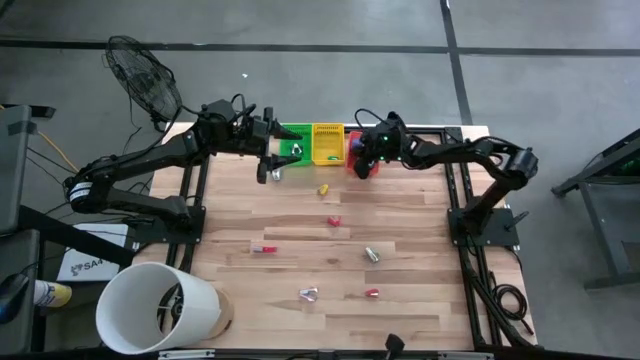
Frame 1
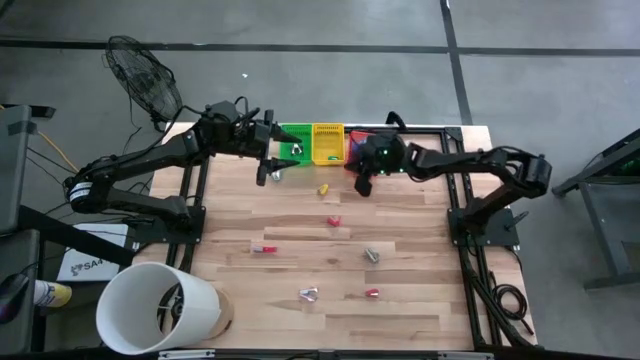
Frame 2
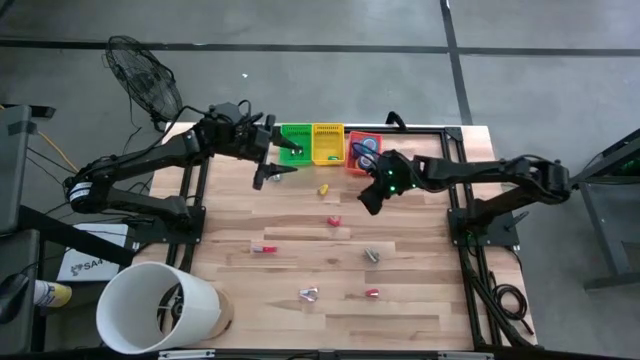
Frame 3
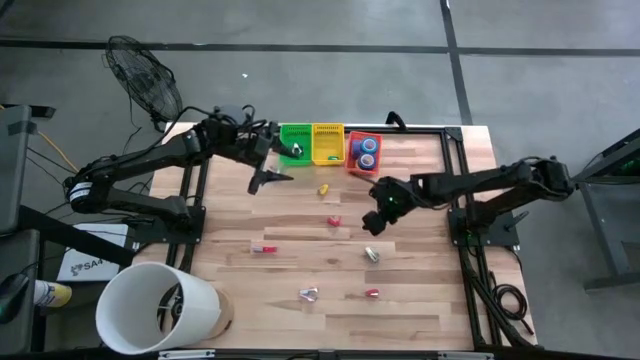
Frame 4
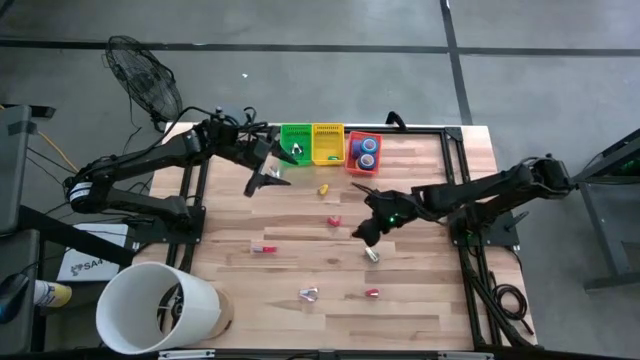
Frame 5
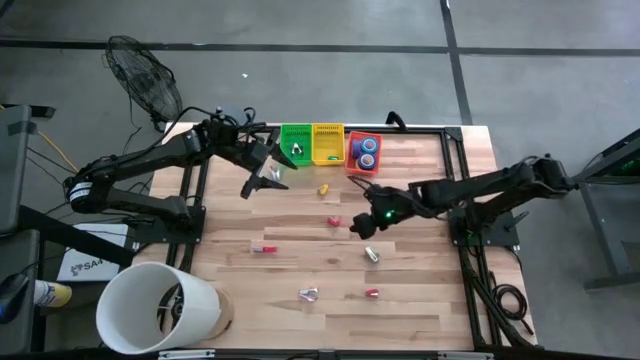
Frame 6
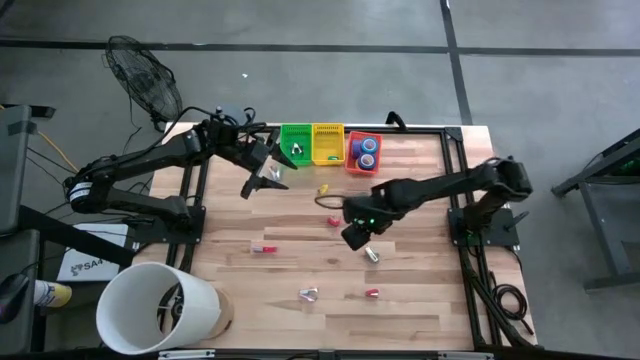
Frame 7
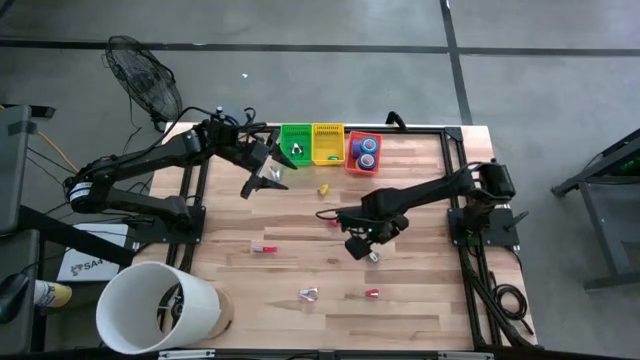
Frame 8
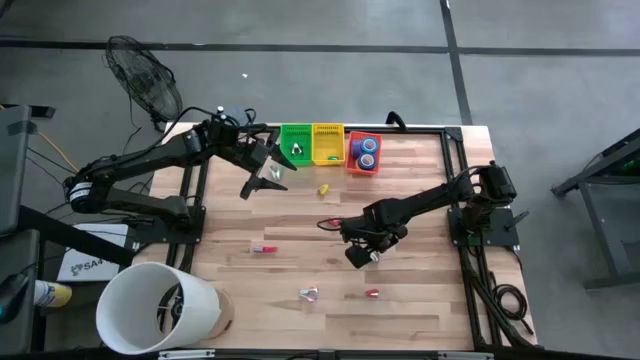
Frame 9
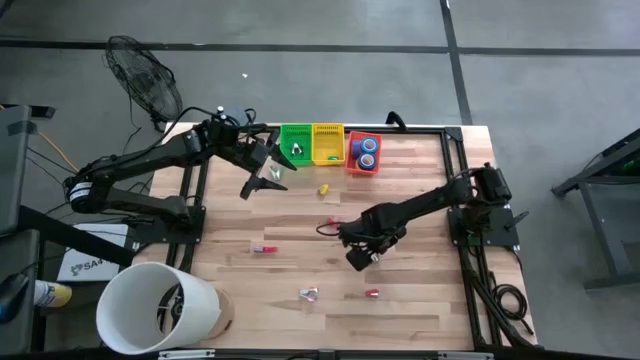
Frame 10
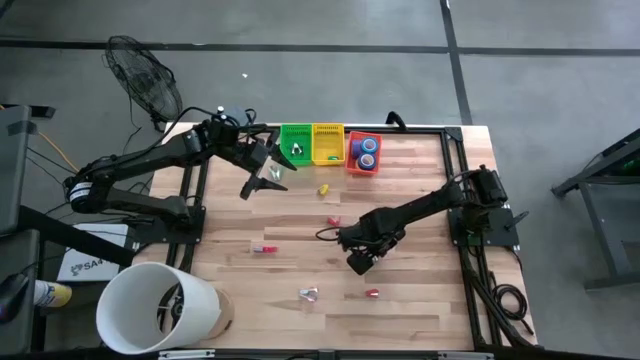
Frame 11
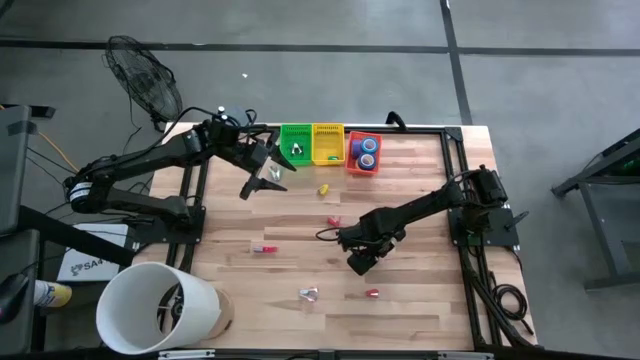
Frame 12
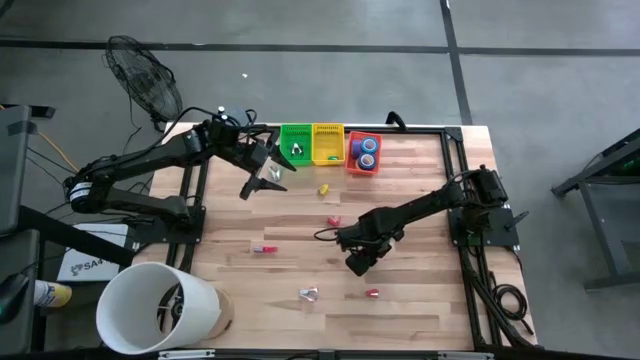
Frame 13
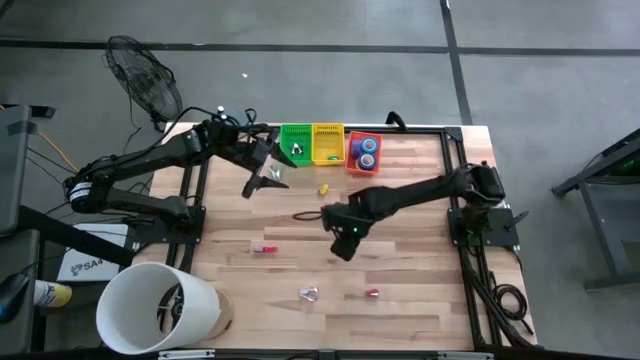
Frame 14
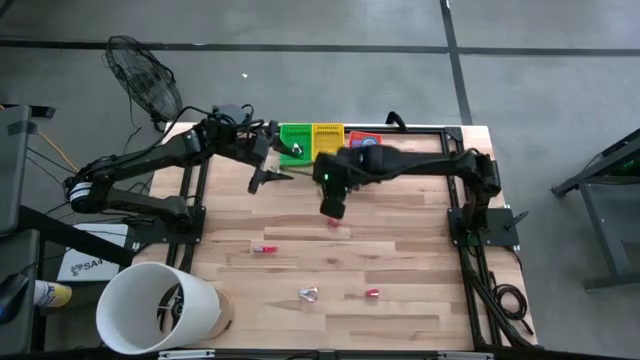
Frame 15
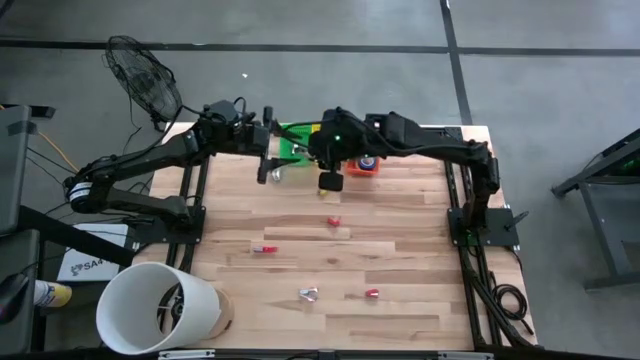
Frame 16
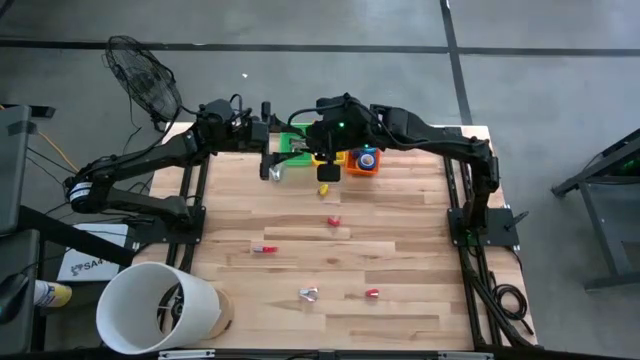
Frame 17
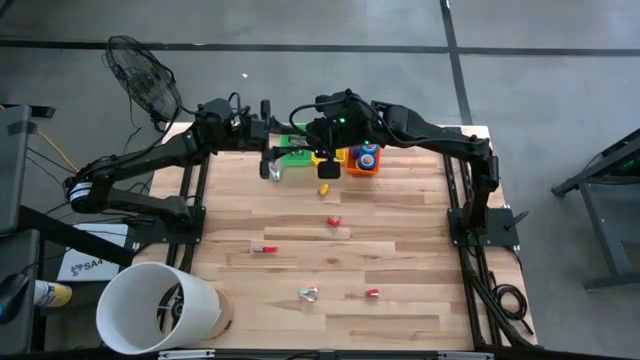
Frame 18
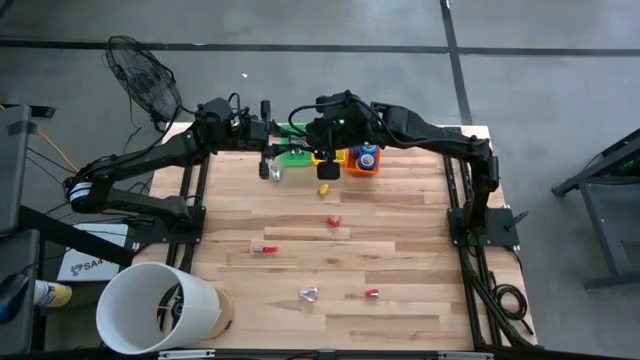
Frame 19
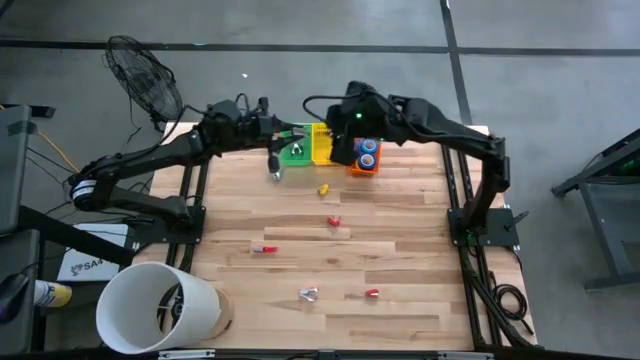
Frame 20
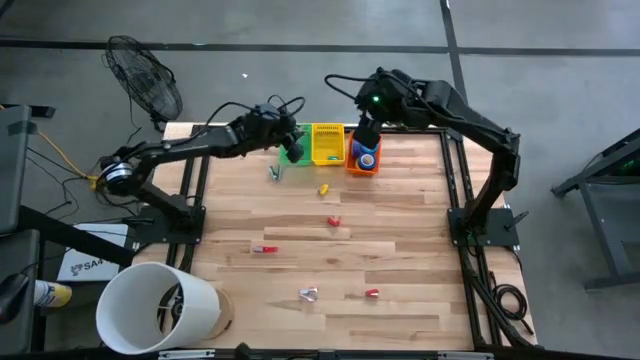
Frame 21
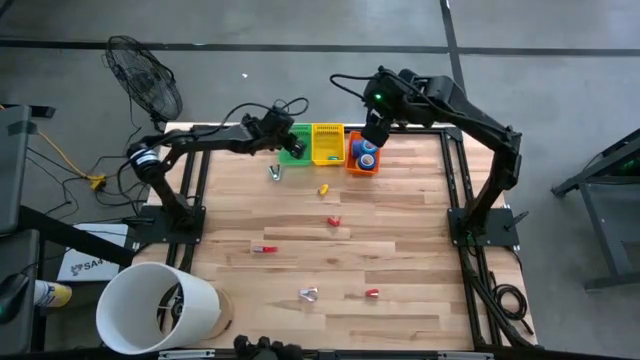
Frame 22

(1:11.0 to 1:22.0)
Task: Pick and place Stapler, Stapler remover, tape
Put the gray staple remover into the green bin

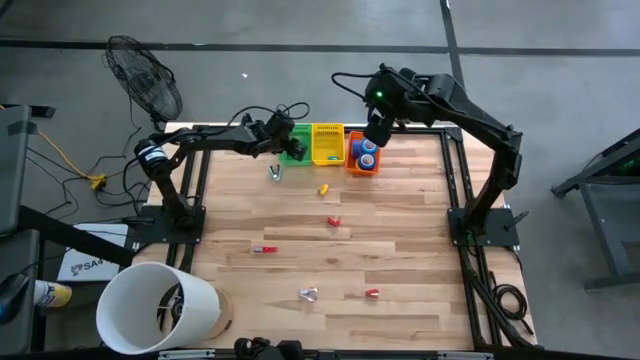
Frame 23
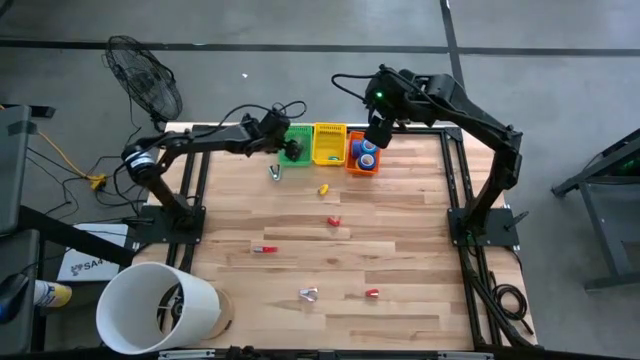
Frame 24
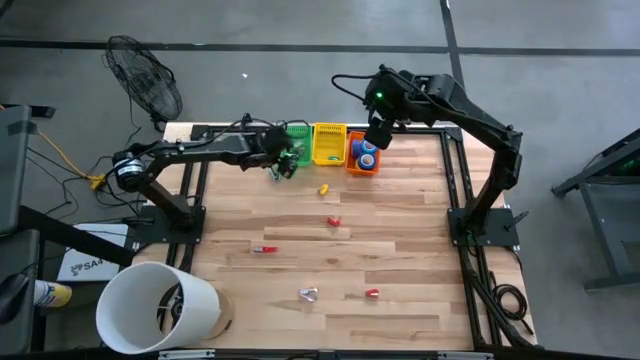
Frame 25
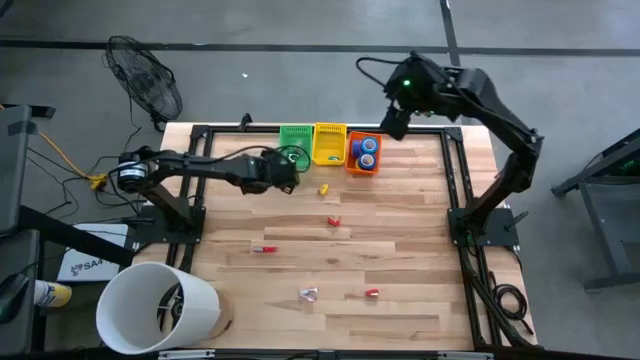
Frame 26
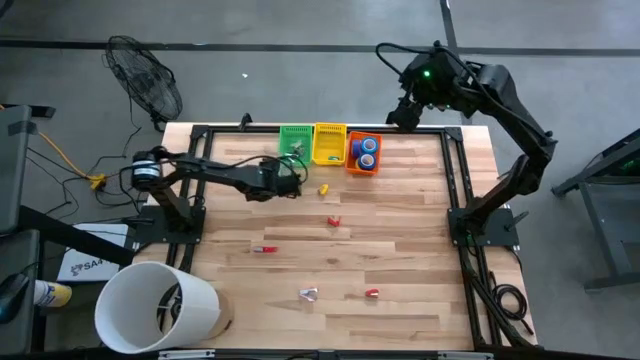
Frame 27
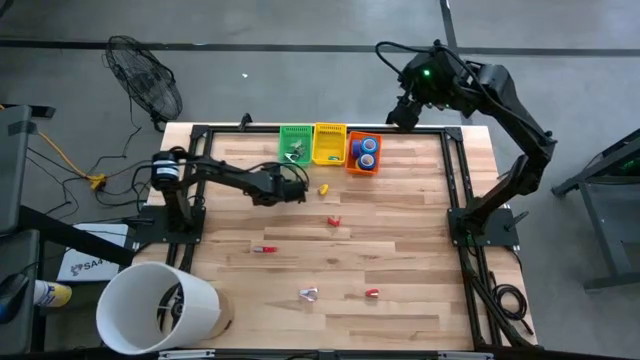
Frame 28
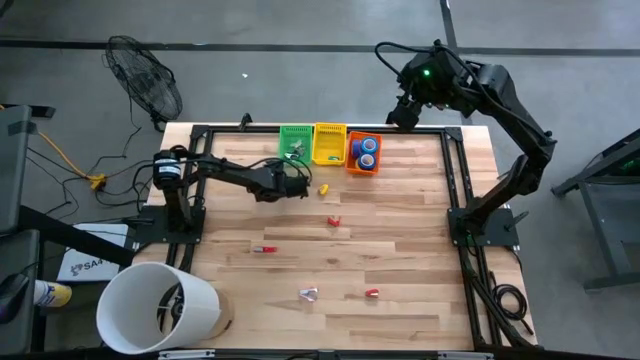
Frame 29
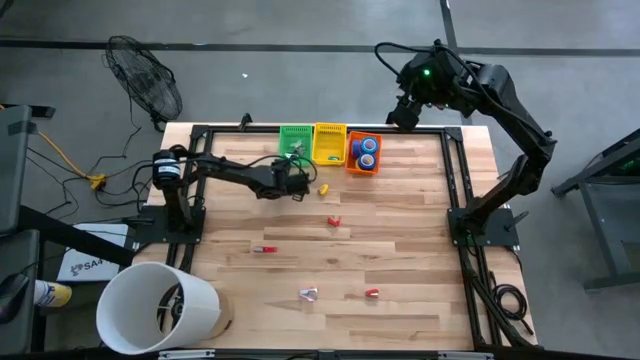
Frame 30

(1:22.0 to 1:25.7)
Put the light blue staple remover into the green bin

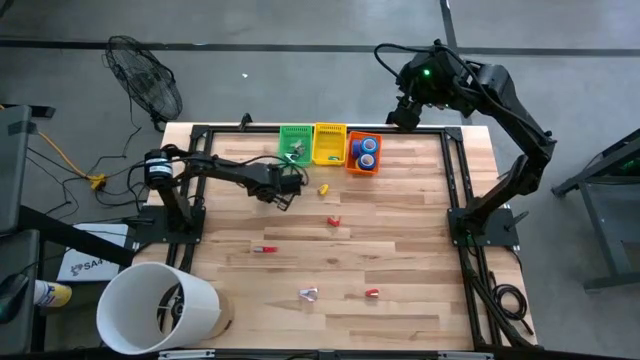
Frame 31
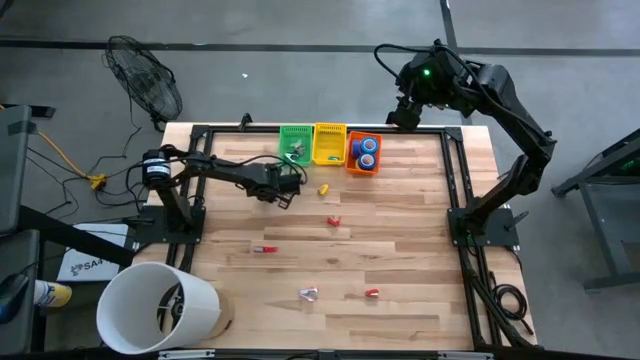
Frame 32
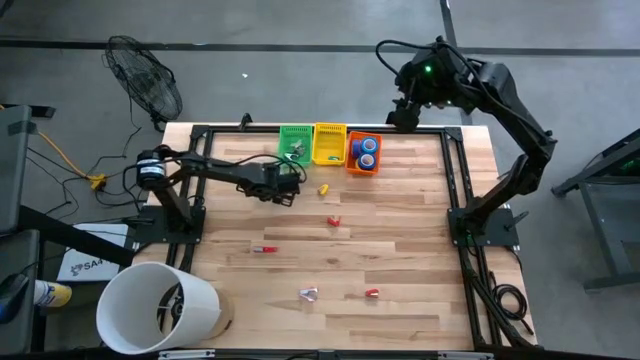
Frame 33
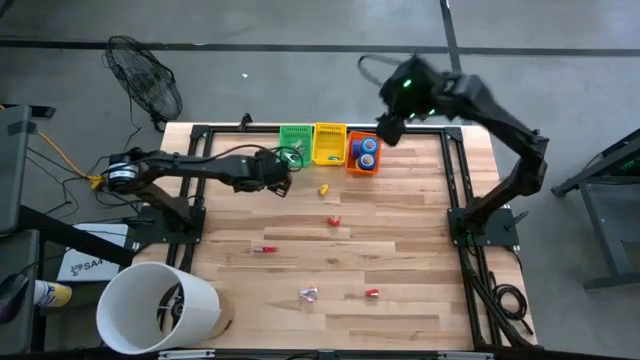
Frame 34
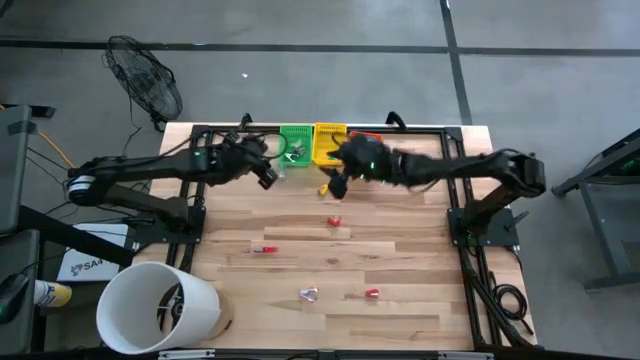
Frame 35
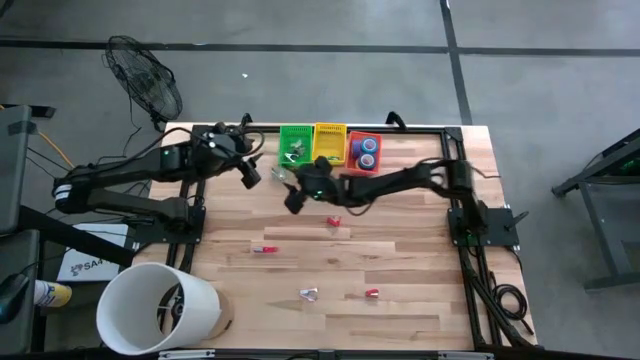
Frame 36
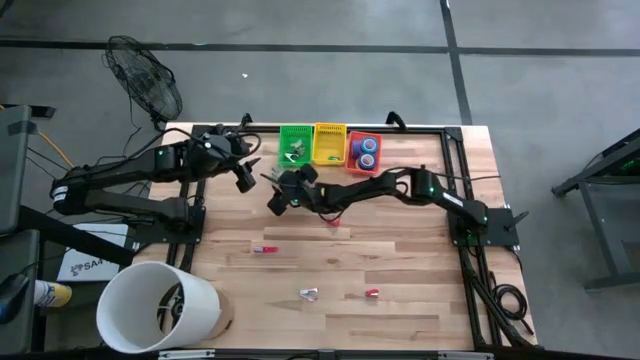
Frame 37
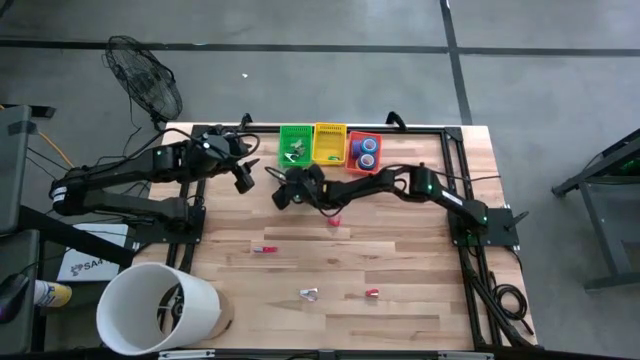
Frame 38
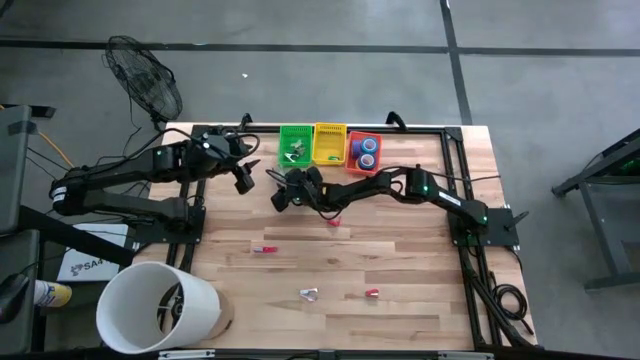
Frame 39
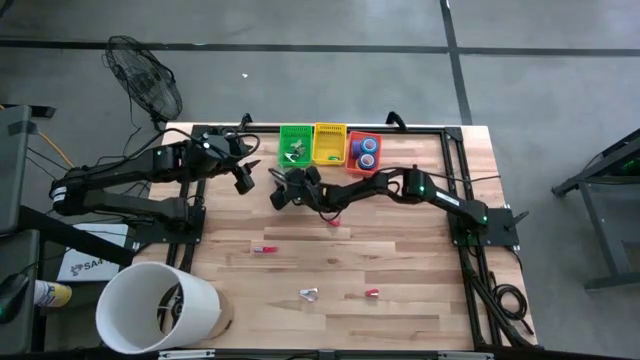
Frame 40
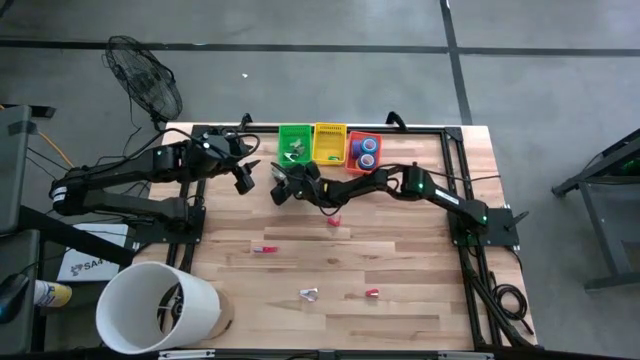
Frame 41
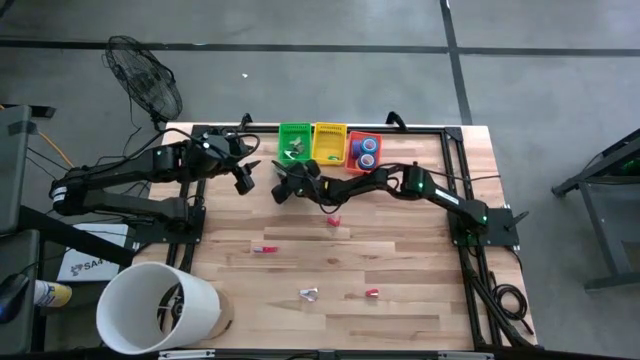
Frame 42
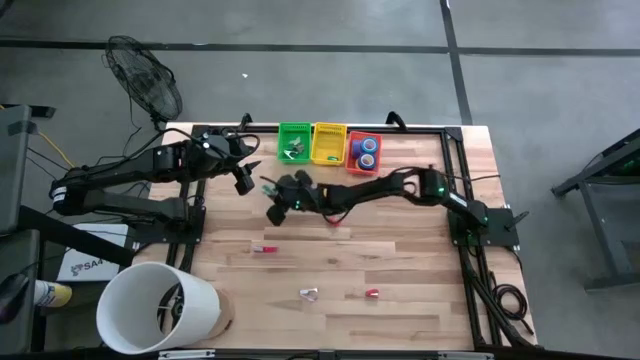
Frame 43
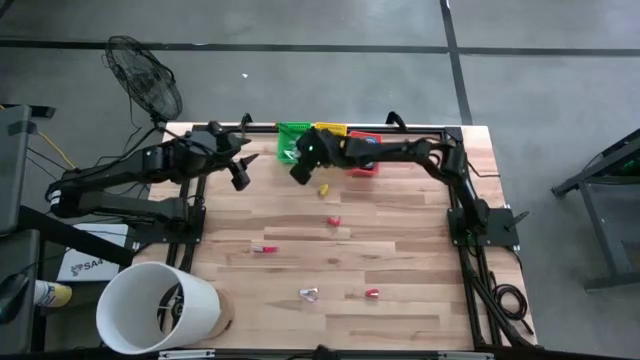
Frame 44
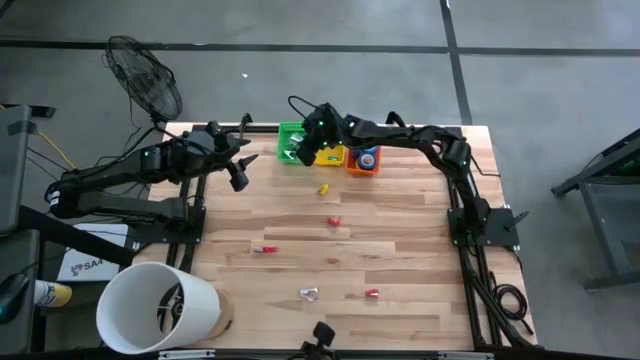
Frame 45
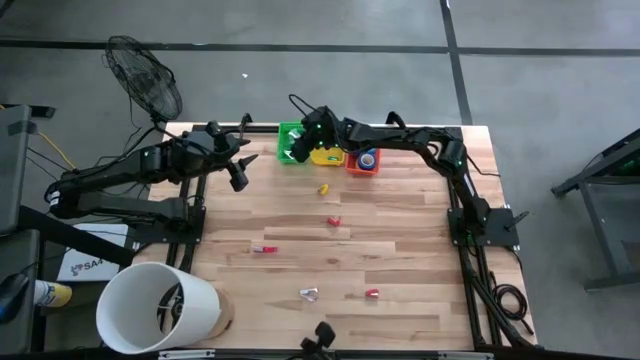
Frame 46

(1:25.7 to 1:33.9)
Put the light blue staple remover into the green bin
